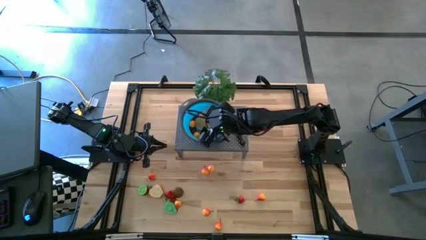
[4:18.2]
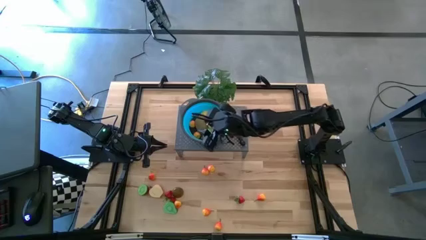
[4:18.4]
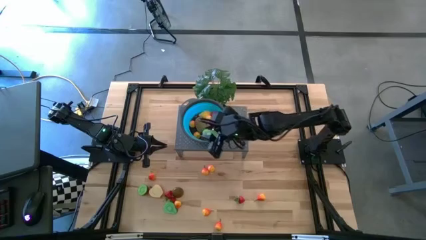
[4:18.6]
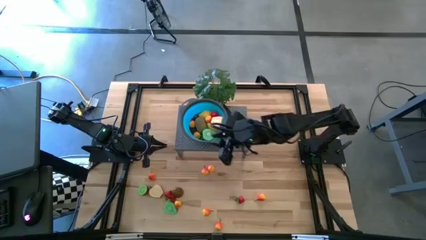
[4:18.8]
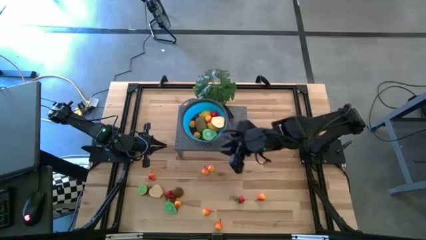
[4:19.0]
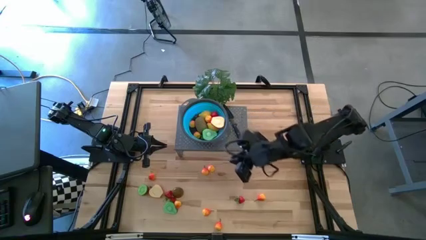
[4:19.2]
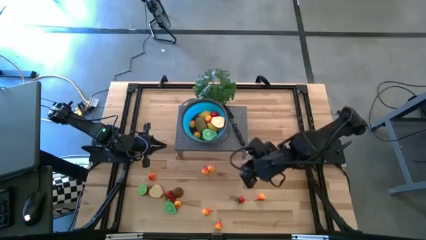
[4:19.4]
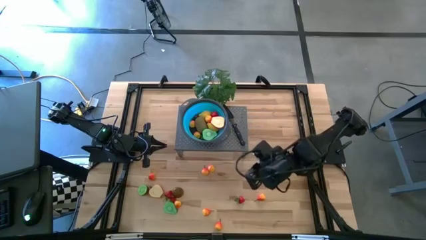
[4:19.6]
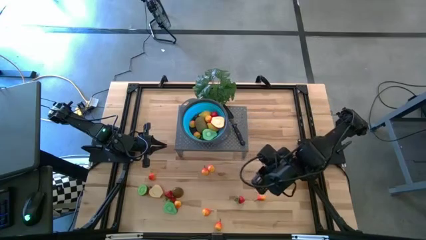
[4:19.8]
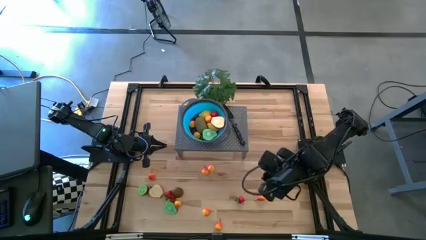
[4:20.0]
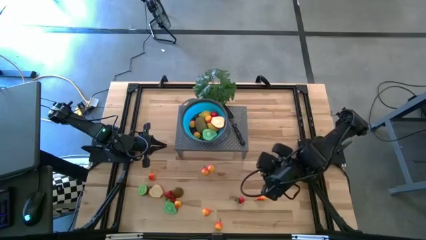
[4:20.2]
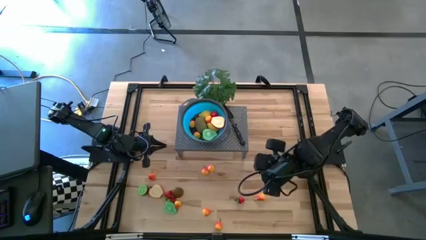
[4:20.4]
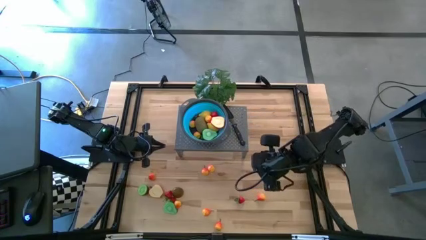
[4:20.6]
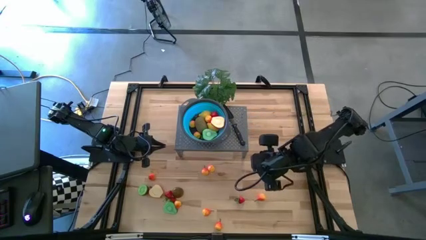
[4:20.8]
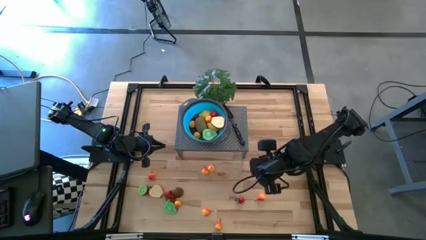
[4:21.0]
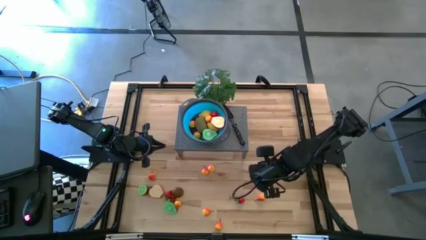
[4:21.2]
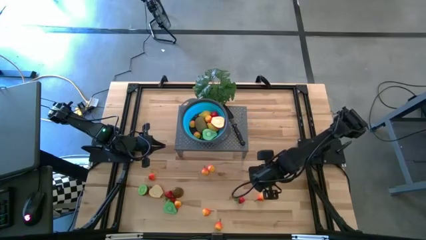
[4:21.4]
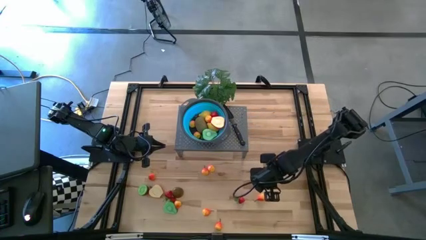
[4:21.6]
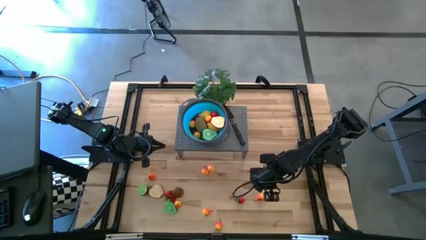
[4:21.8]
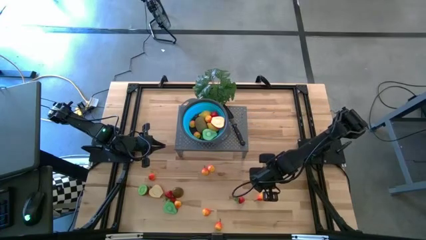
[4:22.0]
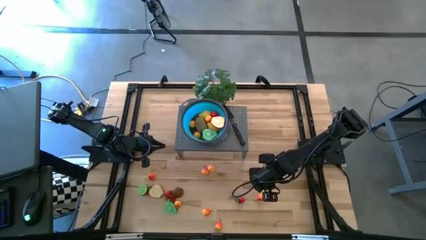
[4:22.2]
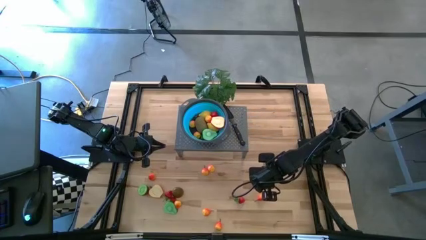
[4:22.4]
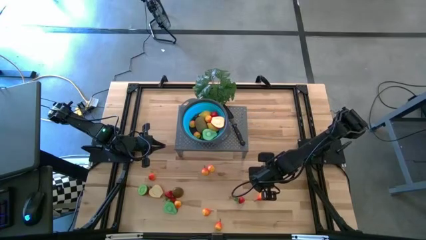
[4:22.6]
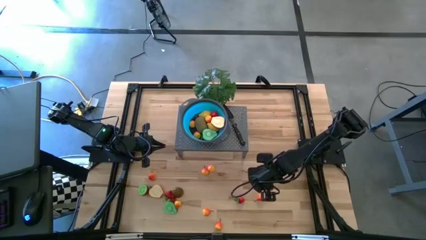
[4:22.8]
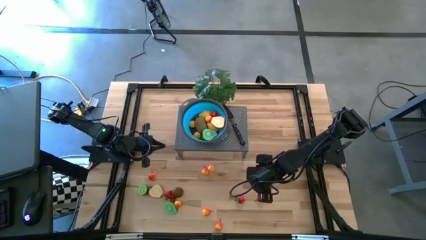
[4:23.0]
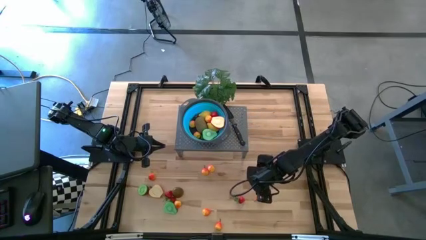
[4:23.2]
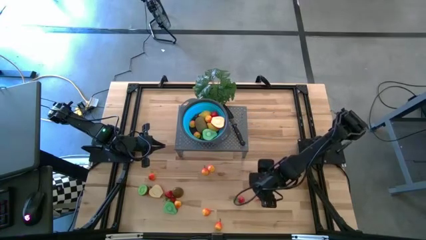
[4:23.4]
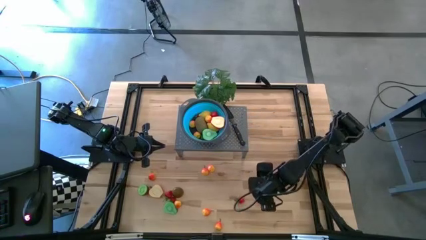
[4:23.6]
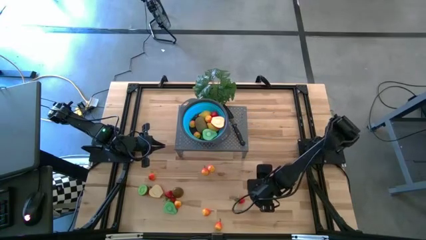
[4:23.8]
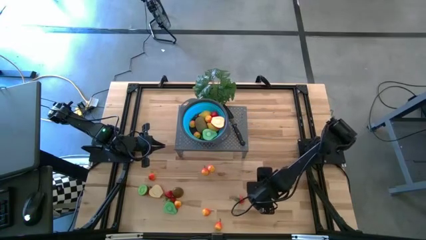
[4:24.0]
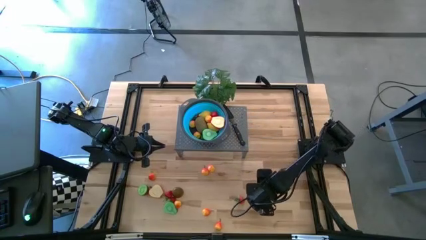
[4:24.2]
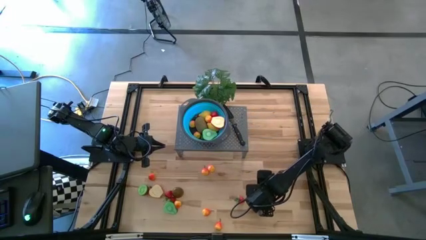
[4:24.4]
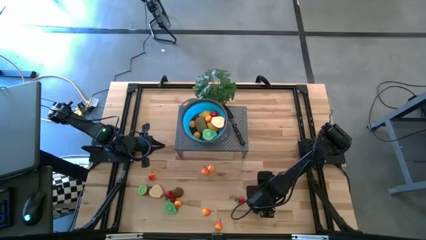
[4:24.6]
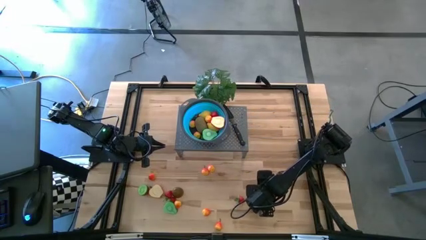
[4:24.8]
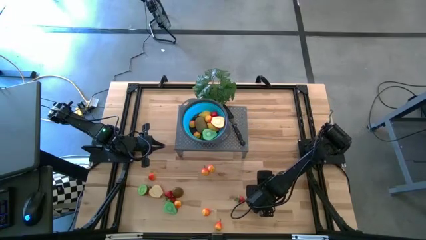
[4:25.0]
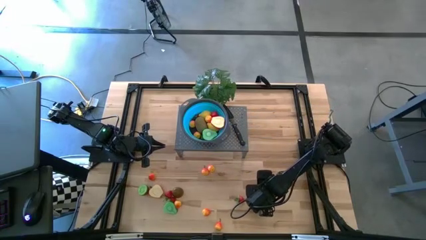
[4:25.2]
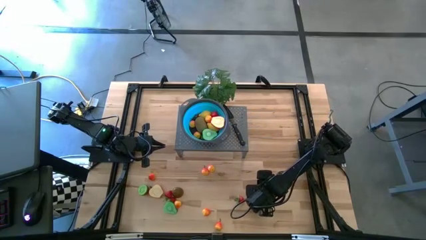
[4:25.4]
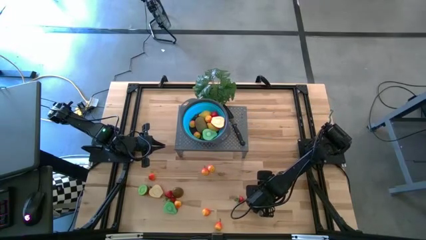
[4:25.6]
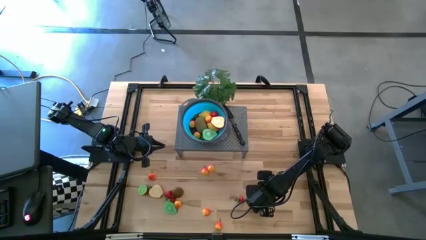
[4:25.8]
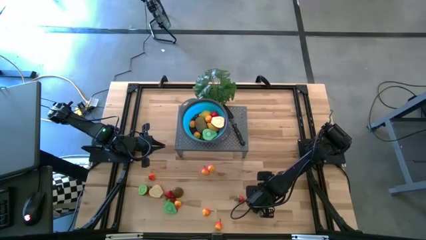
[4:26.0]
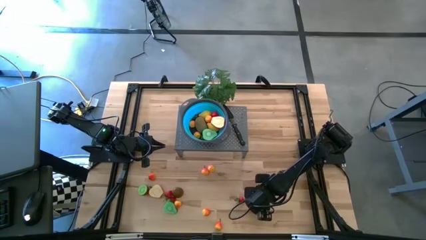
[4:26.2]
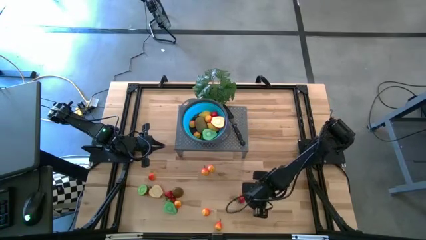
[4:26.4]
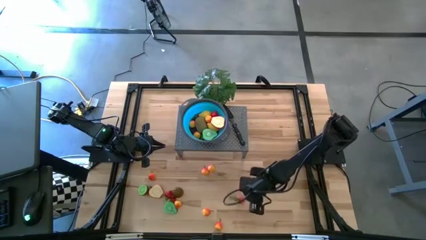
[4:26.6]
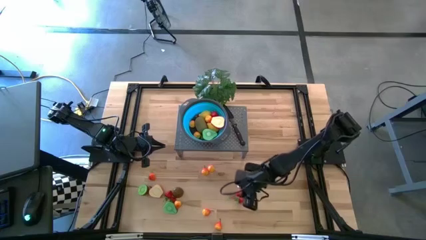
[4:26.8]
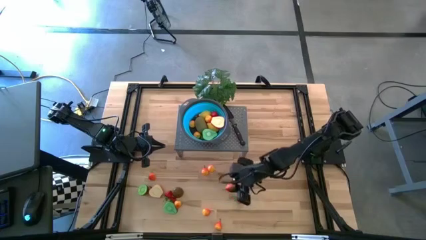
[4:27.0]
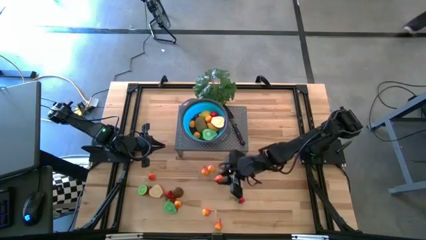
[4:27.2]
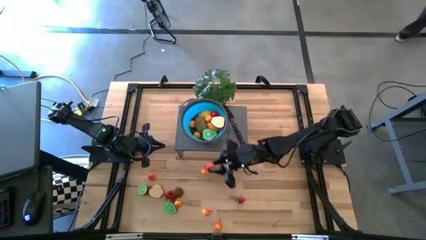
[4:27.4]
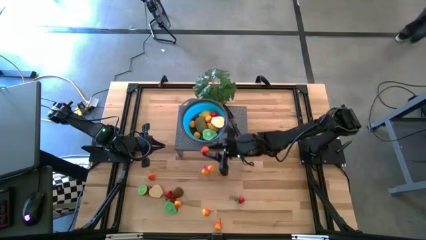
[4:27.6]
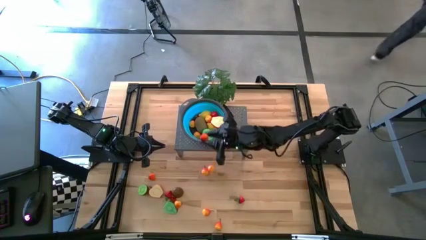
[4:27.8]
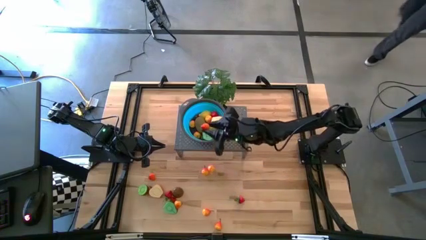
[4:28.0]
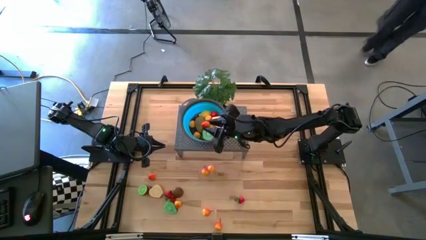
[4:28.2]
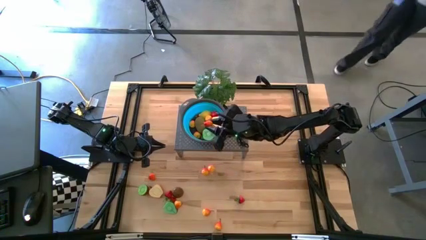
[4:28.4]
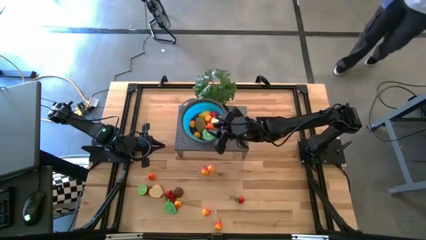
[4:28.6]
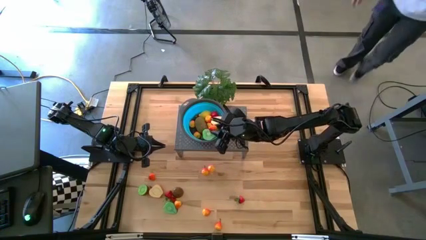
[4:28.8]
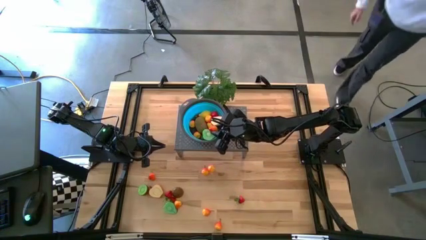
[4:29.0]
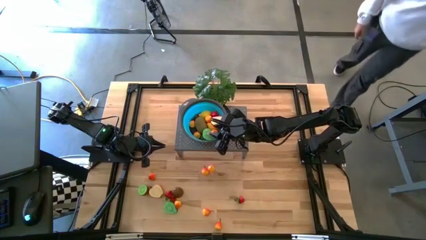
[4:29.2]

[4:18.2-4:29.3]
Task: Pick & Place Fruit
Put the pear into the blue strainer bowl on the shelf

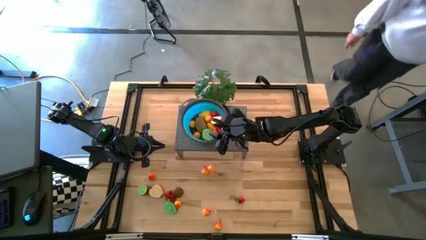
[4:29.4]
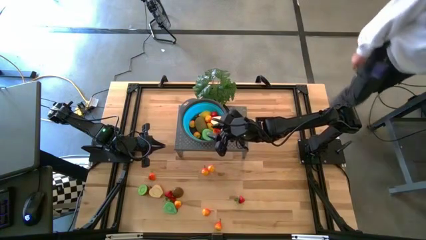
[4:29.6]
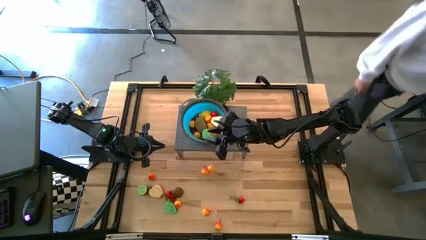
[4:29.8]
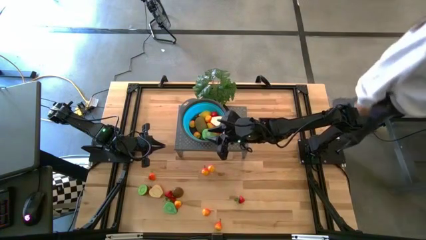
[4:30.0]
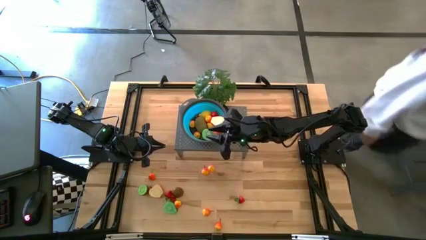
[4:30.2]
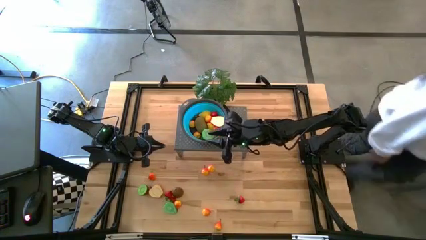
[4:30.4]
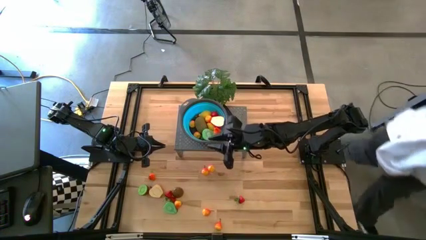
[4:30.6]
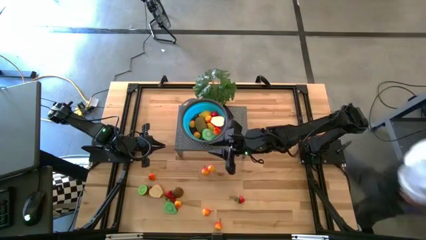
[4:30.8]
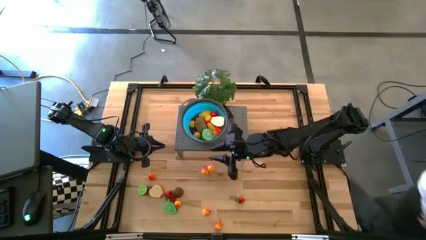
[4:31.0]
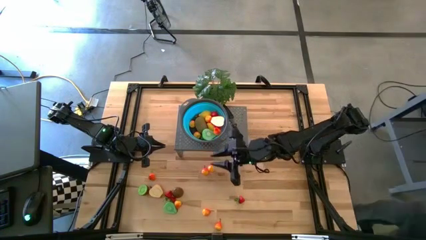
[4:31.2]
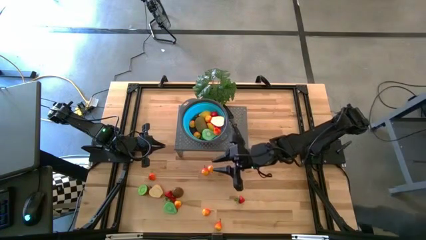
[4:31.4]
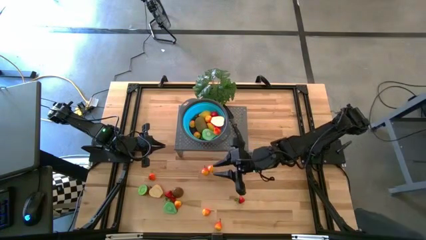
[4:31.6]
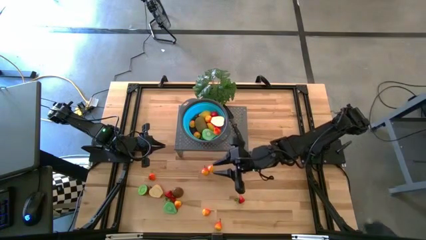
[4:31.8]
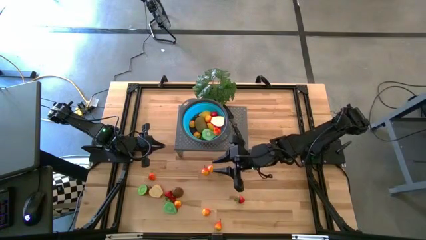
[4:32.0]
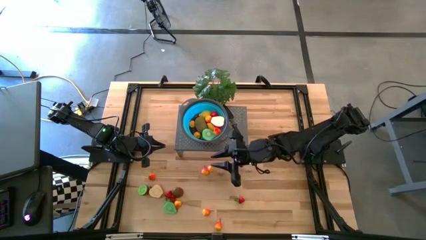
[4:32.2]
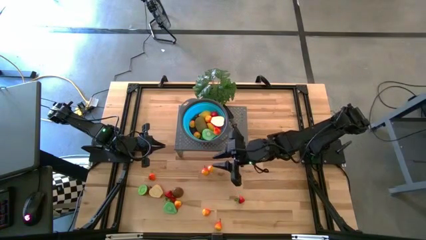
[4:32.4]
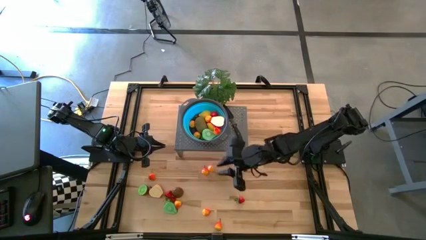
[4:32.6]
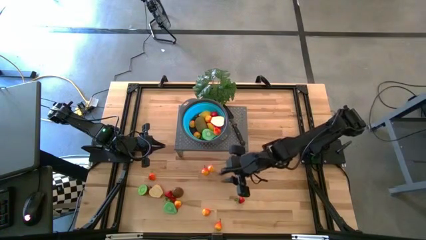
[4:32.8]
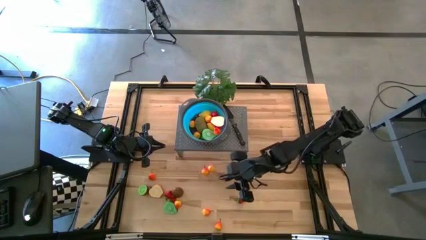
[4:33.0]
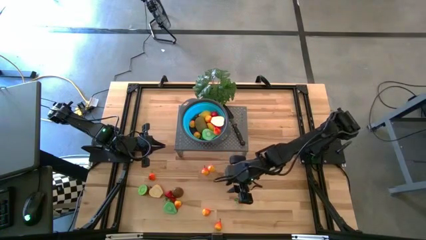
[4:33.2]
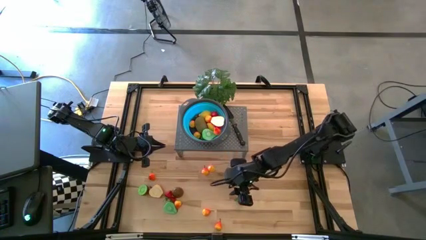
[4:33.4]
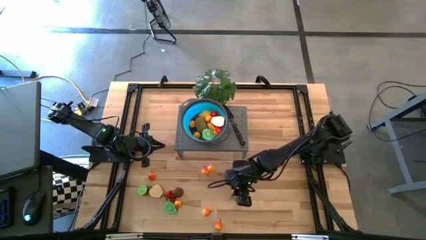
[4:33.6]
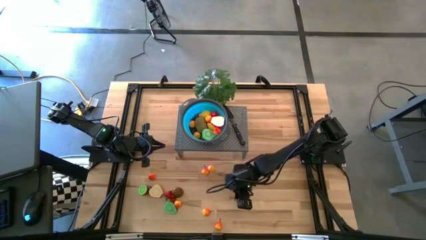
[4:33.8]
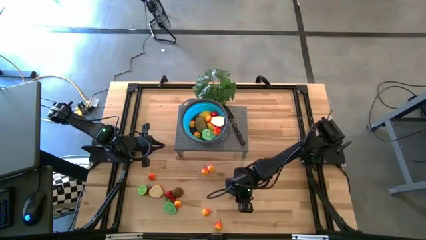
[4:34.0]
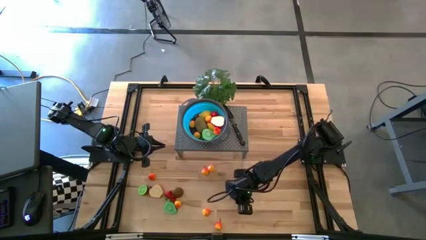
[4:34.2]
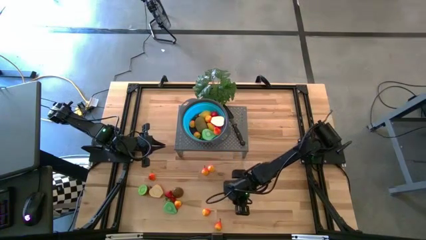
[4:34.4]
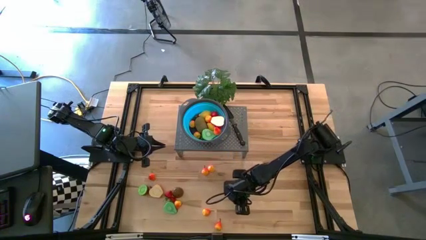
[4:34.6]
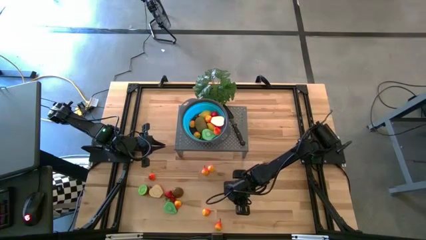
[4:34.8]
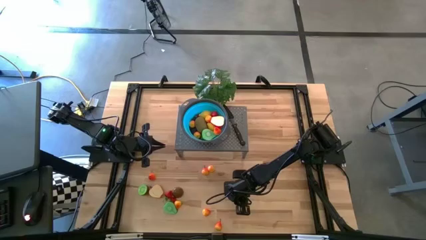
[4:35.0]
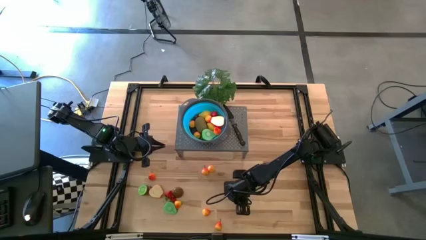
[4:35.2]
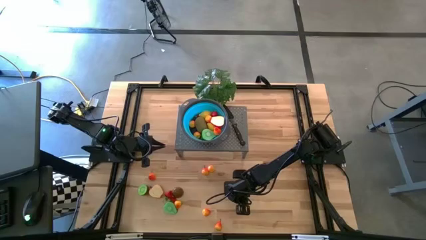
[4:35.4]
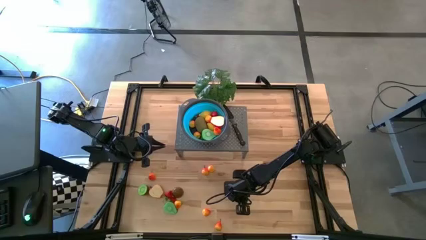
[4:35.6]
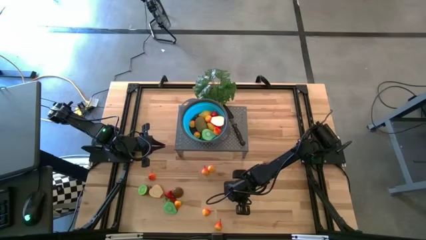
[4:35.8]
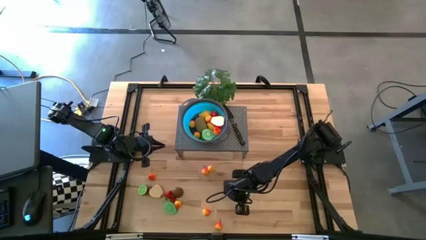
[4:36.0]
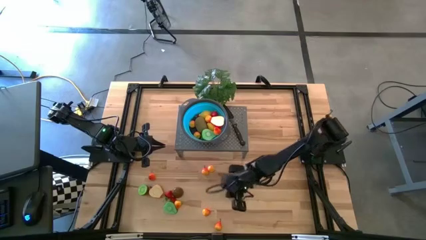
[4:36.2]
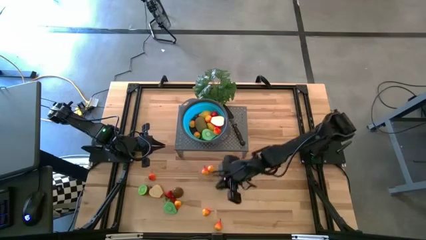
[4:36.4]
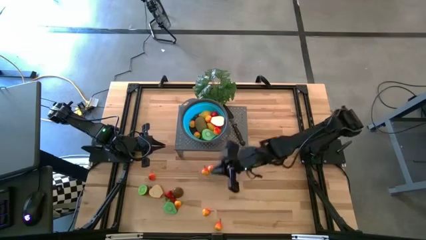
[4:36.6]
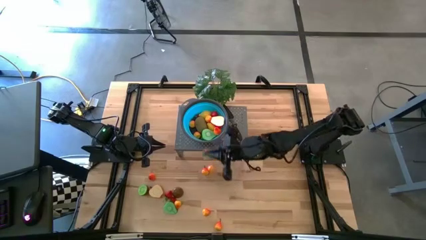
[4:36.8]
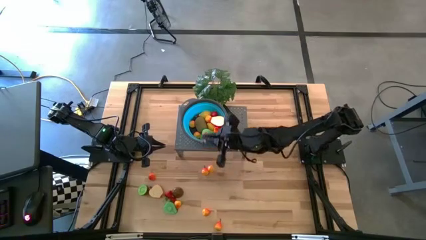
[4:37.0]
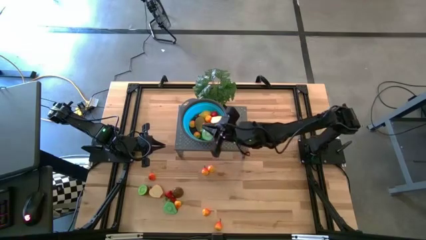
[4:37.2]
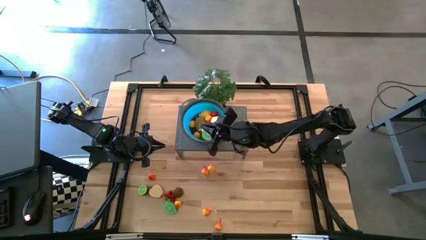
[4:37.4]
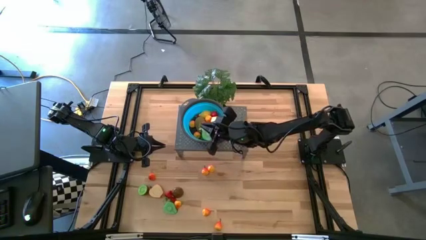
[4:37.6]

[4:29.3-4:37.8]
Put the strawberry into the blue strainer bowl on the shelf
